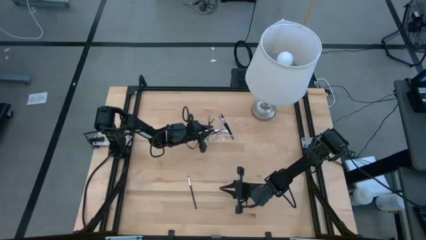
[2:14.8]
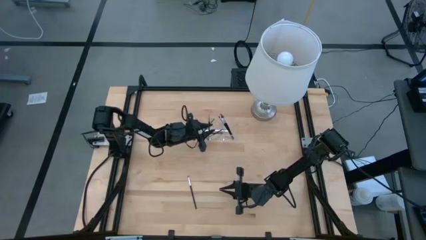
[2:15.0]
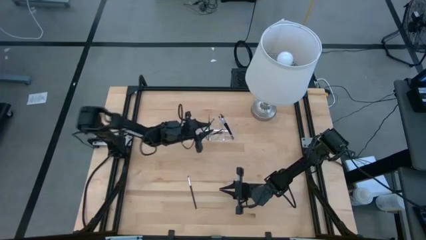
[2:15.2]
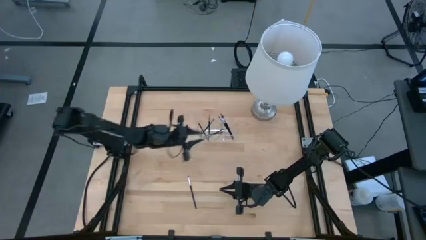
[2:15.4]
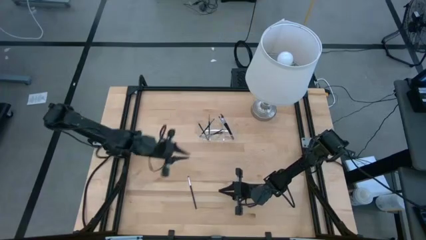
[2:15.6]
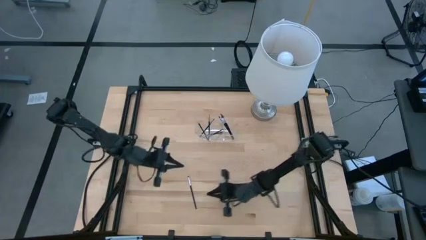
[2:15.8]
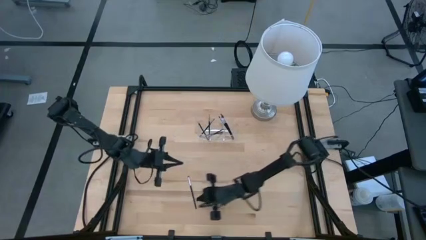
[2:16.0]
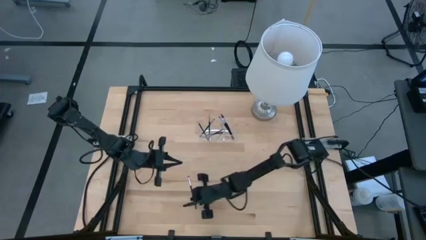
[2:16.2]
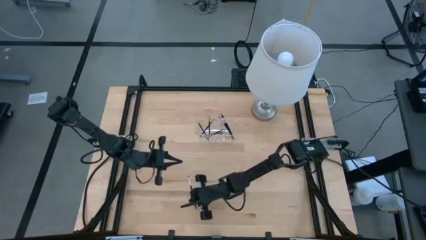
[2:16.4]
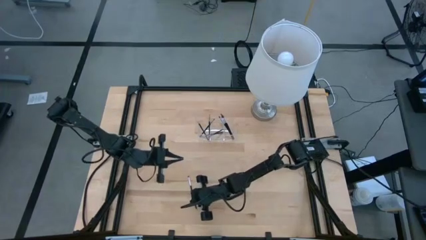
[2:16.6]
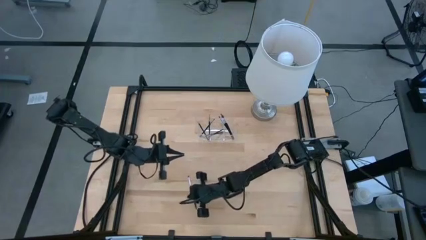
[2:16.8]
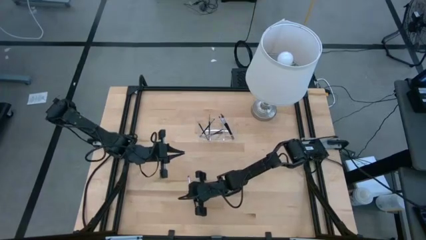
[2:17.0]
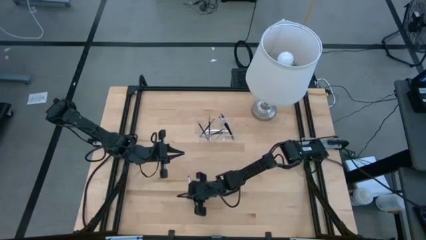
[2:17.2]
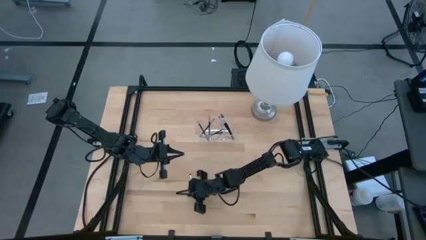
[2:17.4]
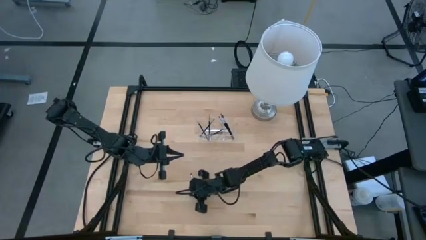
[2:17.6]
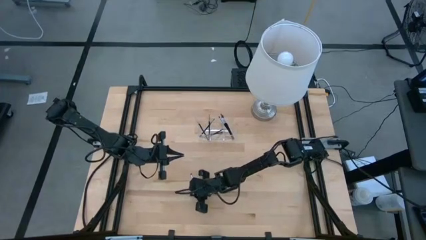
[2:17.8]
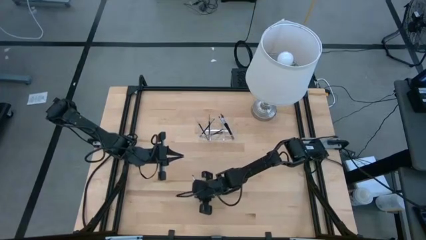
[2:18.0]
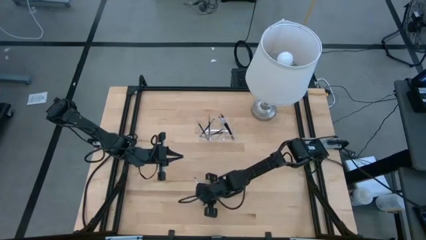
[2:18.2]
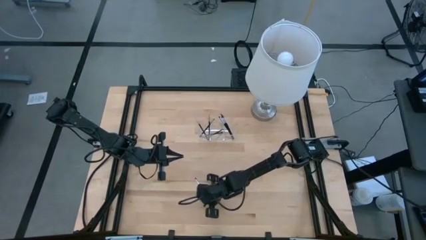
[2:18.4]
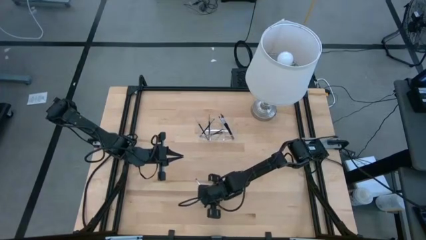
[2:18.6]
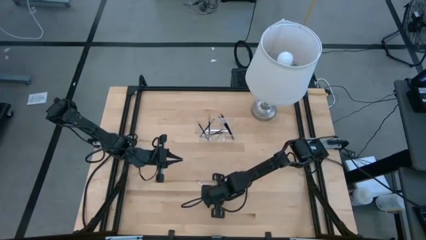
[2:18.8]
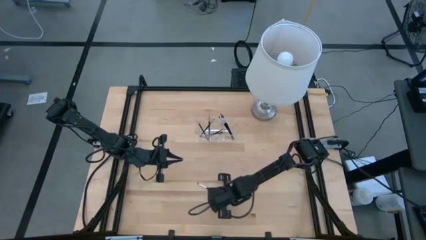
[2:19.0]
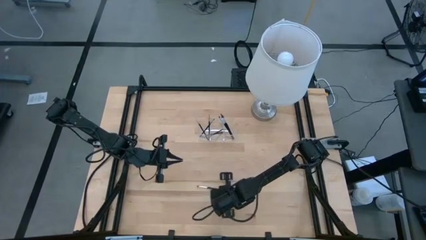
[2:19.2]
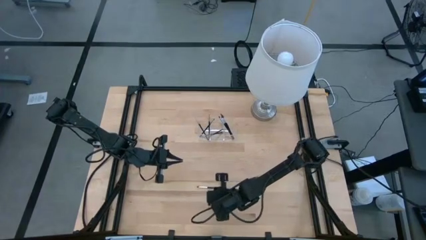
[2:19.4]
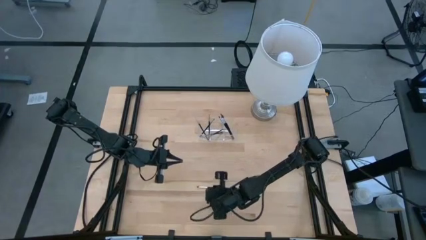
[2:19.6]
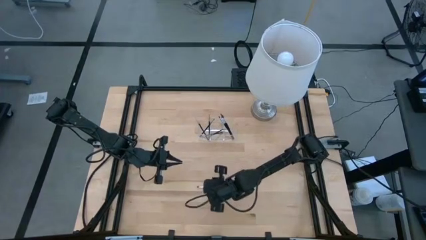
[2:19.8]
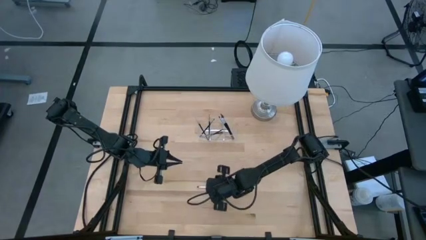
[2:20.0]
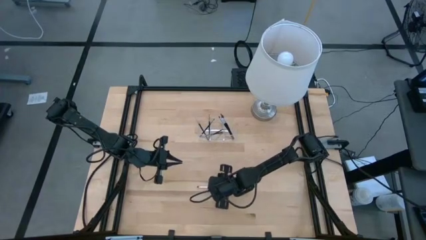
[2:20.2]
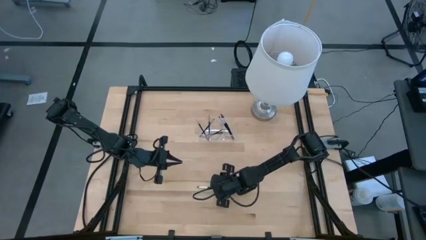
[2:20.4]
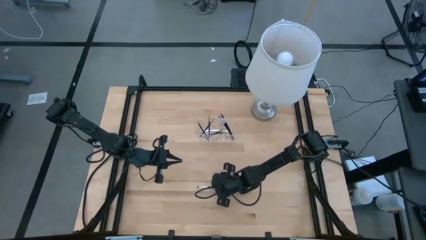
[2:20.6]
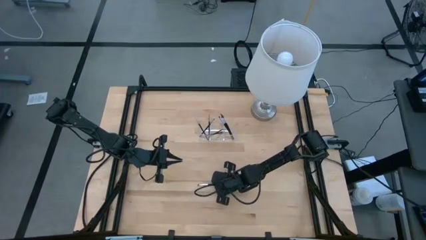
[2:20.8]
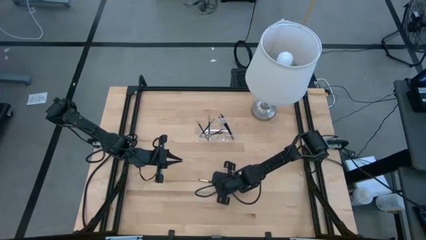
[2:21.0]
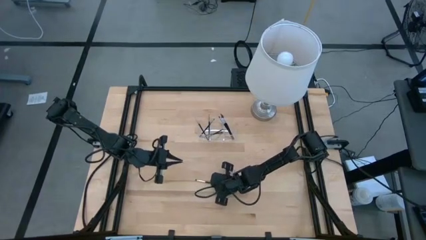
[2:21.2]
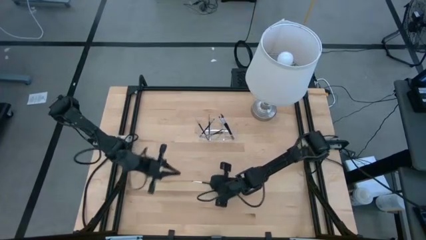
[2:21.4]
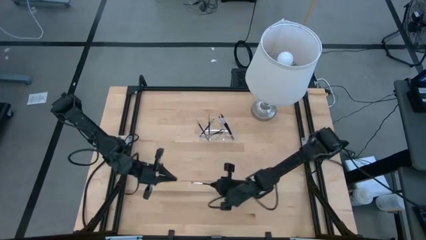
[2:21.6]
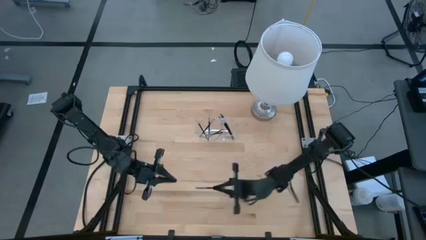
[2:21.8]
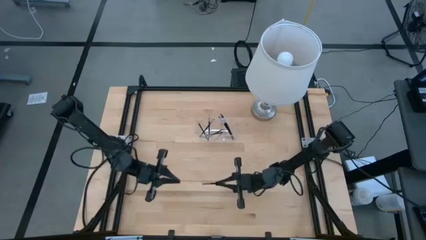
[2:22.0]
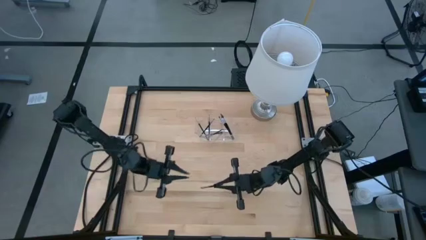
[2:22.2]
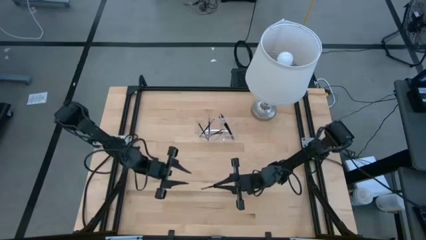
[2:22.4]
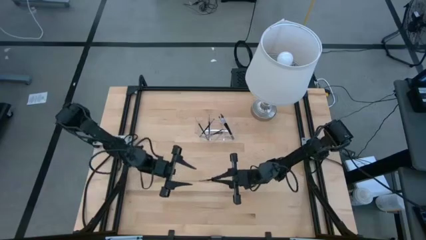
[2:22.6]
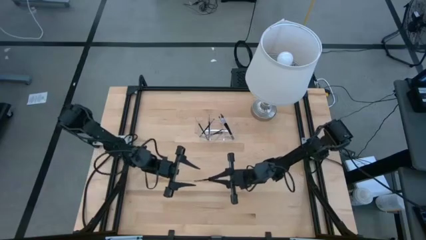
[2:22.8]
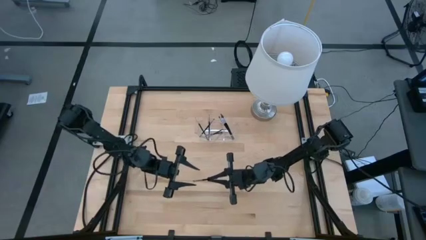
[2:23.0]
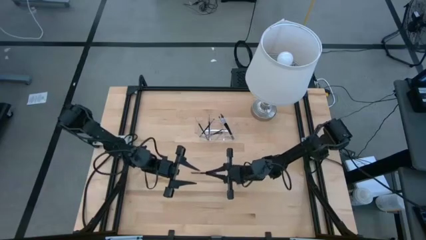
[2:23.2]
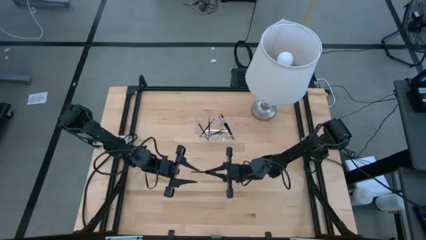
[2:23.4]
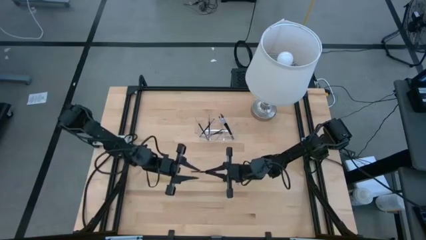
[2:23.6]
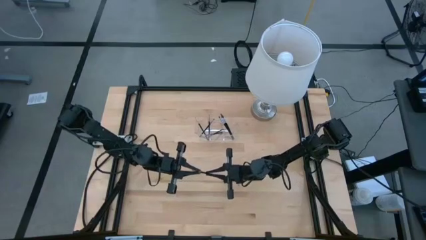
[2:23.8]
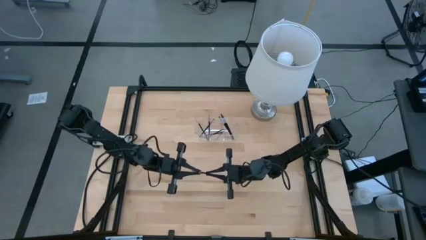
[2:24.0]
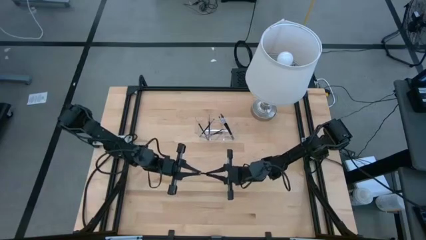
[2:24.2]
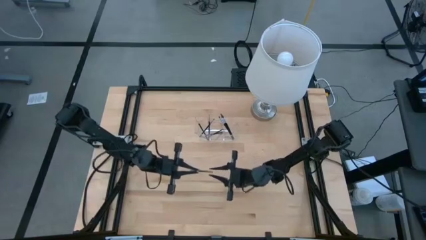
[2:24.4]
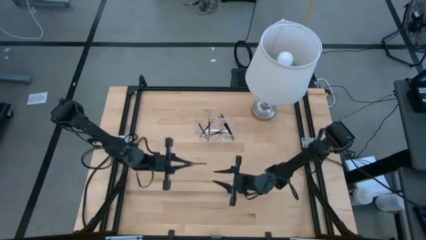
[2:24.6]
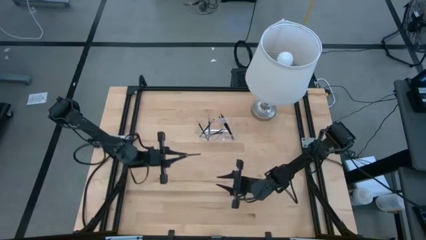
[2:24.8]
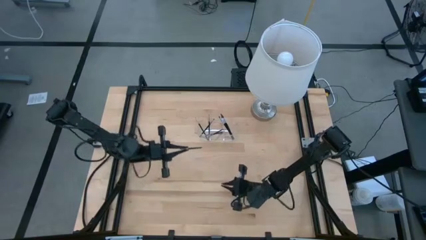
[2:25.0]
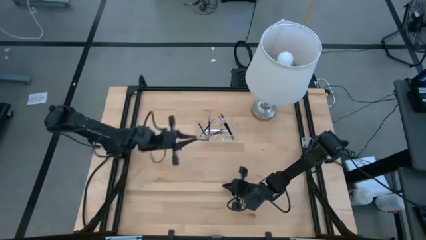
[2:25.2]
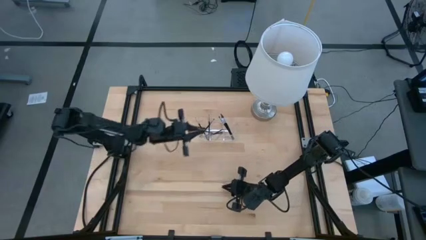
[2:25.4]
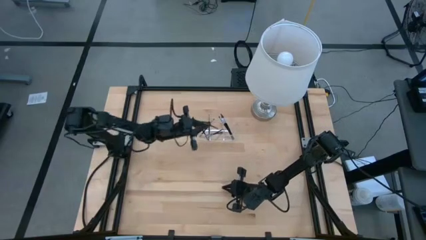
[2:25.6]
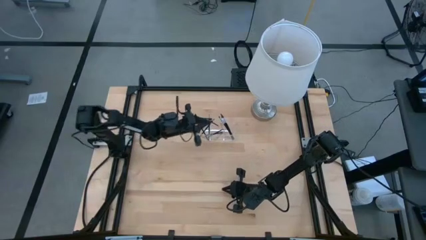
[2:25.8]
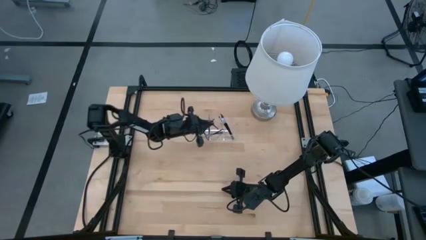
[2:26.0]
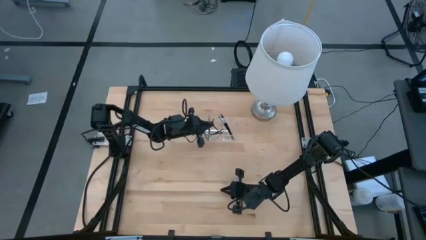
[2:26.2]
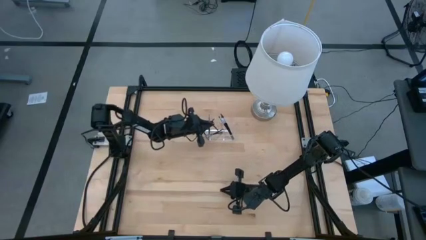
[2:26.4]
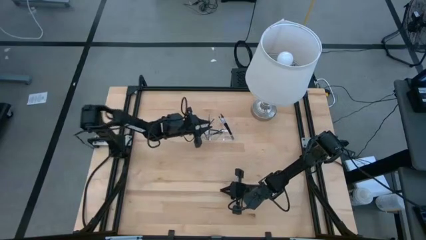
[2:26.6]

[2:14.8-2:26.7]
Task: Put items in baskets/containers
Put the black foundation brush transparent organizer

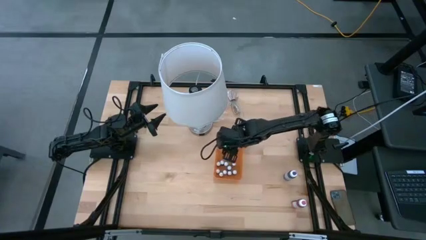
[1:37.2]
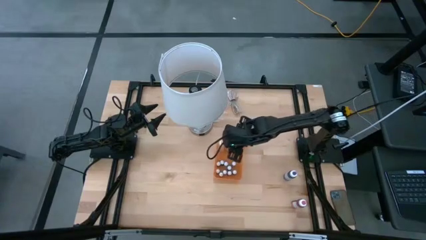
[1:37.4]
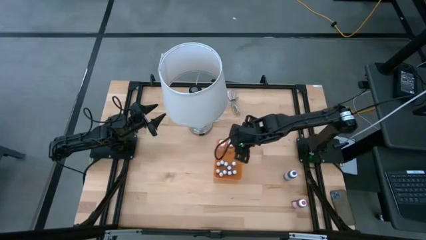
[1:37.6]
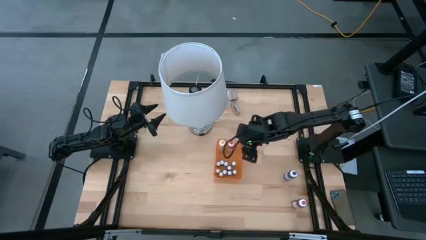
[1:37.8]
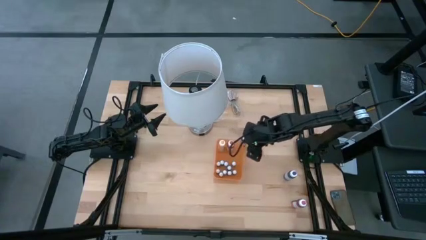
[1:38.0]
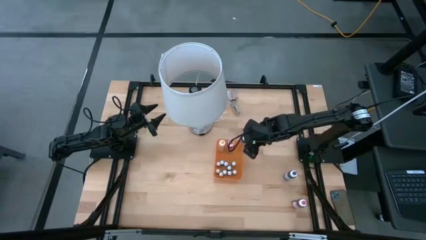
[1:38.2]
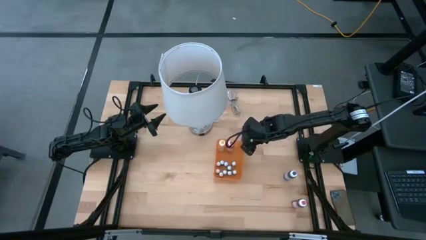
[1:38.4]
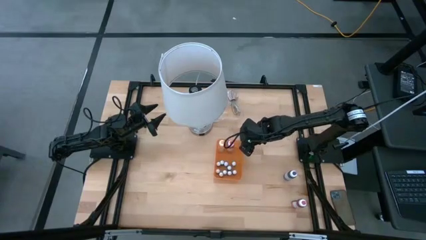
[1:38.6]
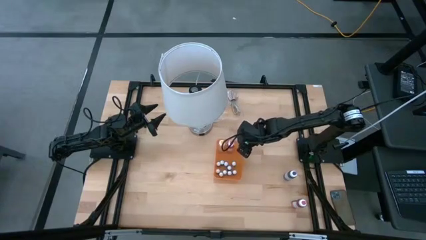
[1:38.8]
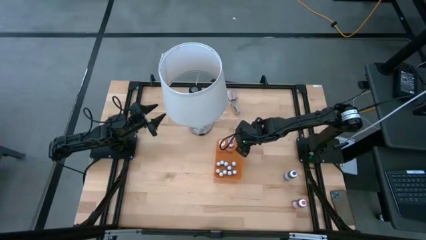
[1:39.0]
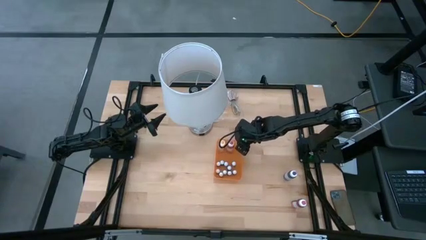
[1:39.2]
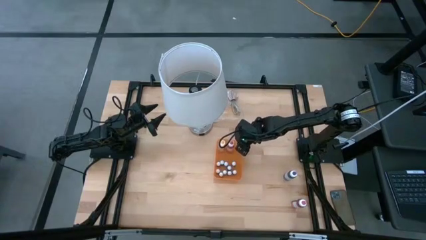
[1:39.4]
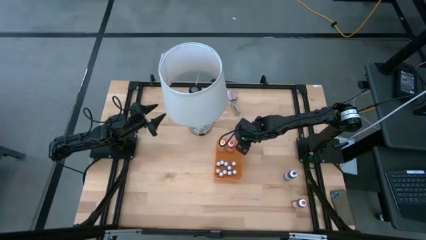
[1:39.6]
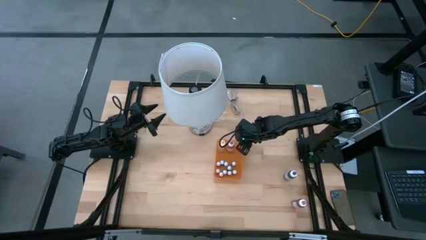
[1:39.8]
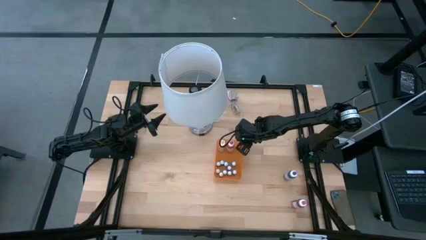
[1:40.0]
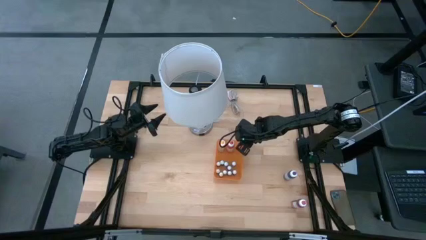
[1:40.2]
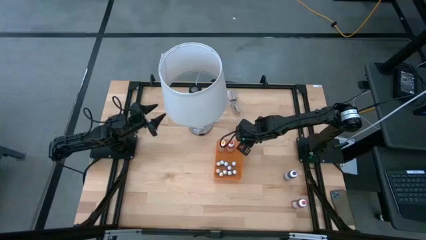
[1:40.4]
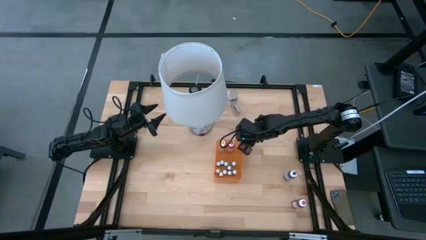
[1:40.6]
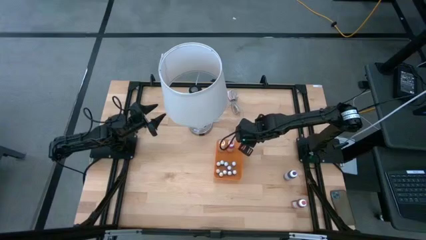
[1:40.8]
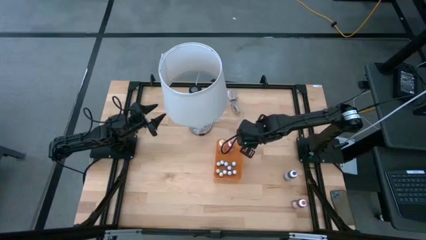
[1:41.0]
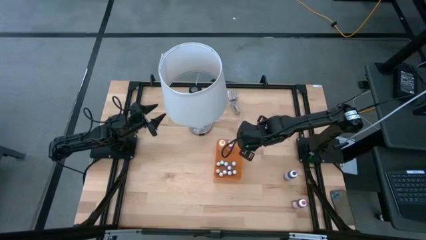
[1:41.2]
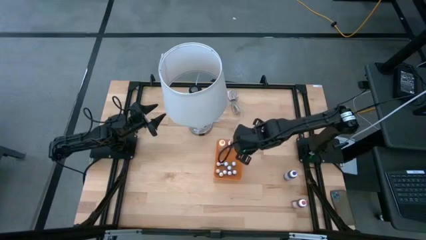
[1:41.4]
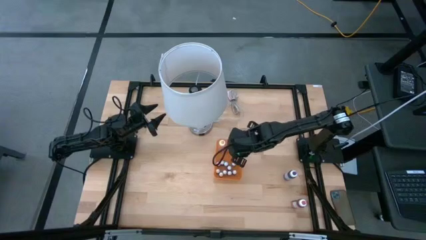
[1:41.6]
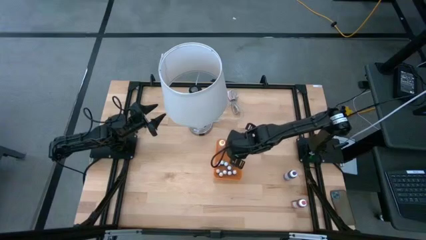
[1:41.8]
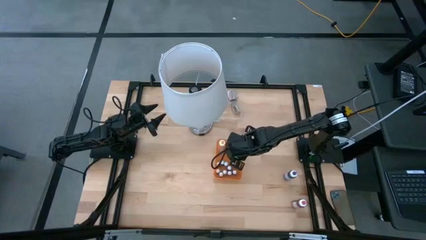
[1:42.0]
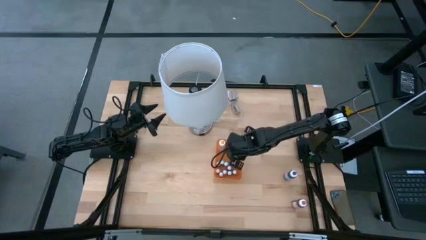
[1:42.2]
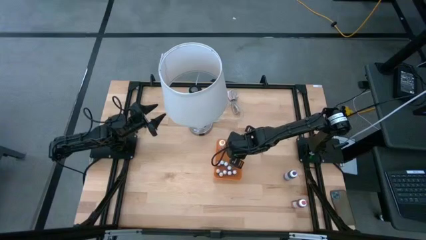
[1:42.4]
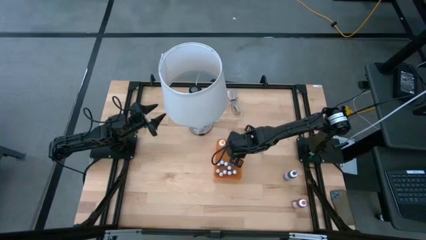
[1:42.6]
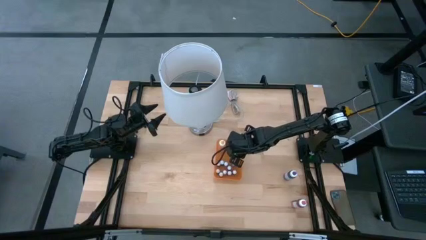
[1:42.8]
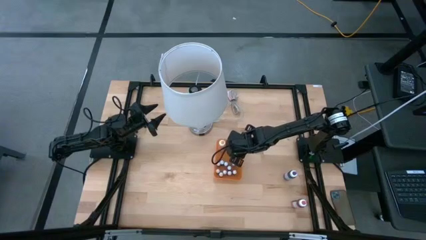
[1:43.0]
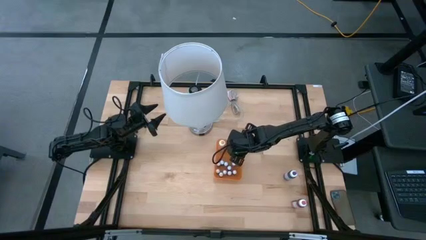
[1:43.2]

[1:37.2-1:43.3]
Task: Pick & Place food coloring
Put the big blue food coloring bottle into the bin
